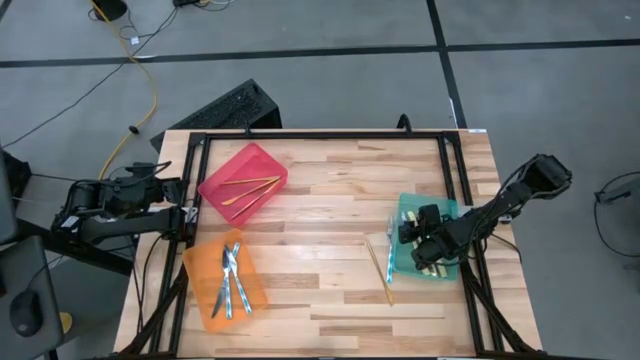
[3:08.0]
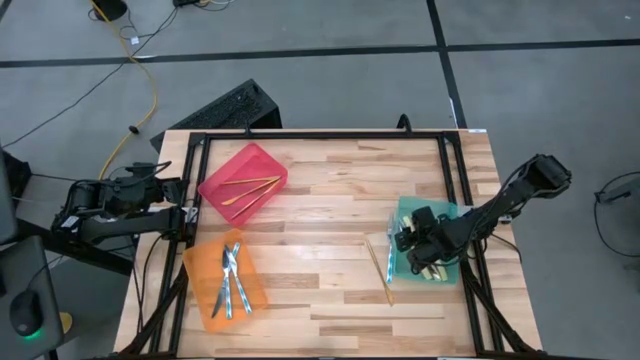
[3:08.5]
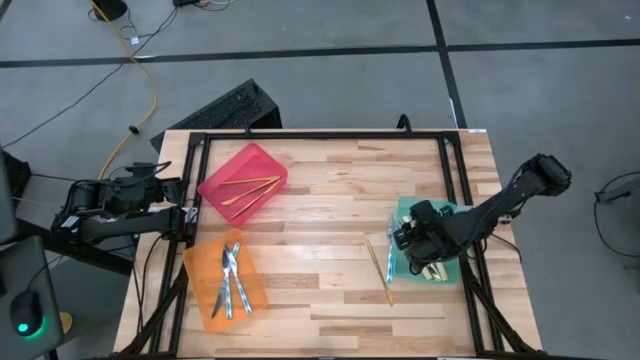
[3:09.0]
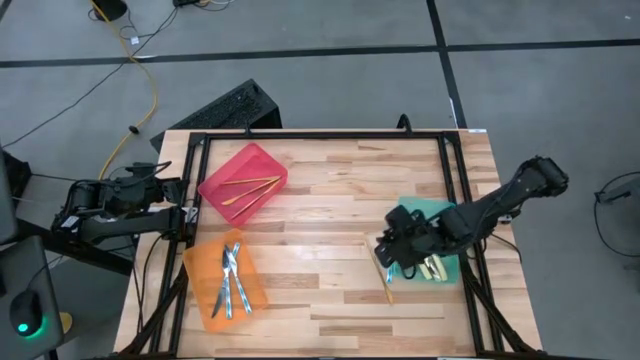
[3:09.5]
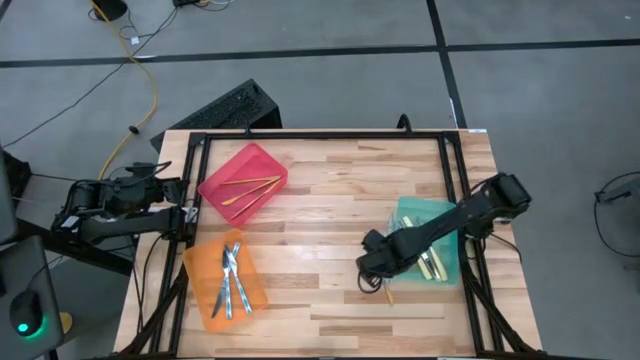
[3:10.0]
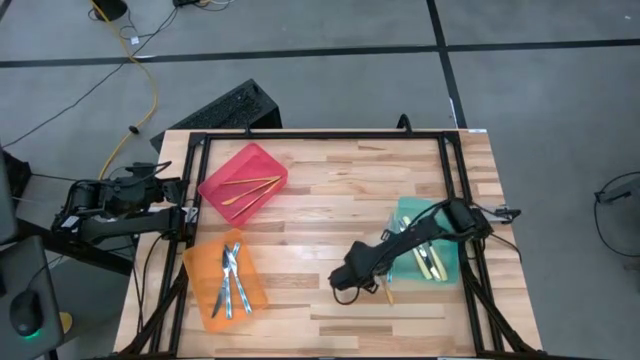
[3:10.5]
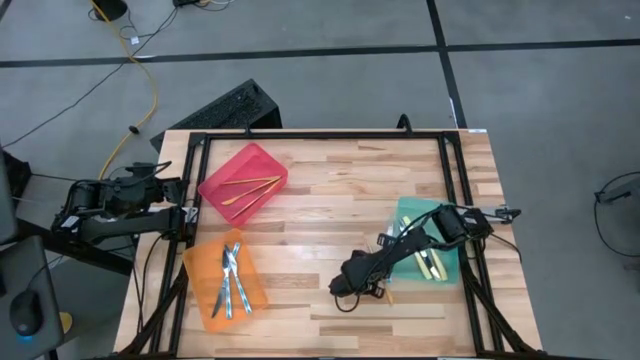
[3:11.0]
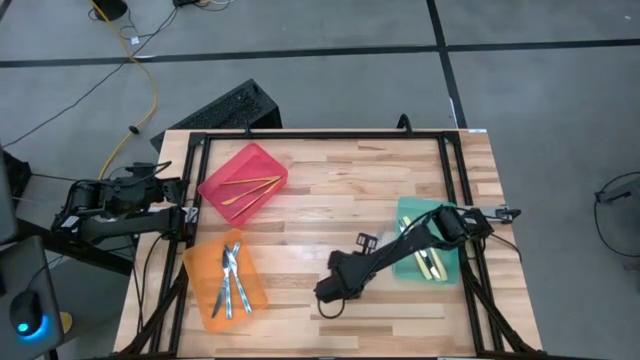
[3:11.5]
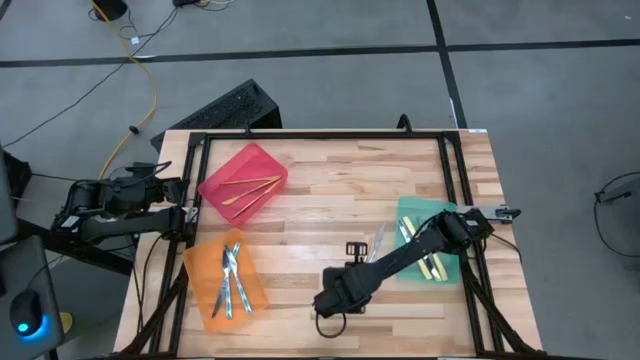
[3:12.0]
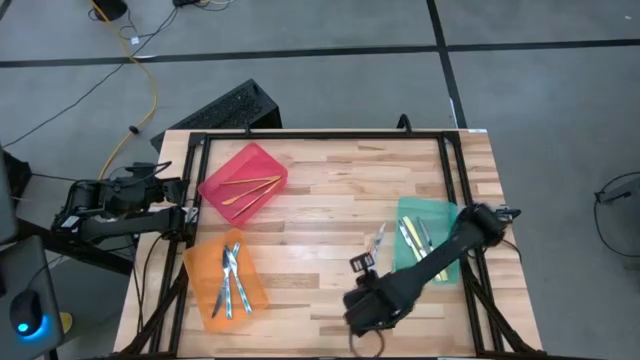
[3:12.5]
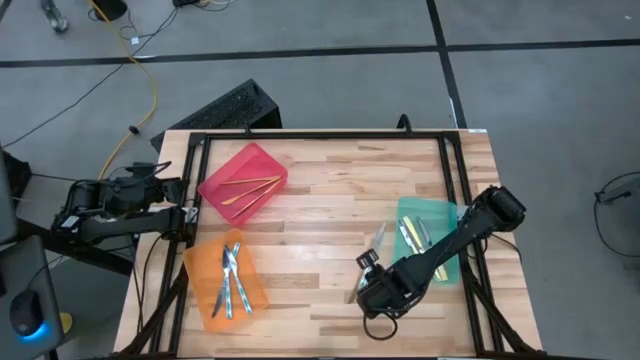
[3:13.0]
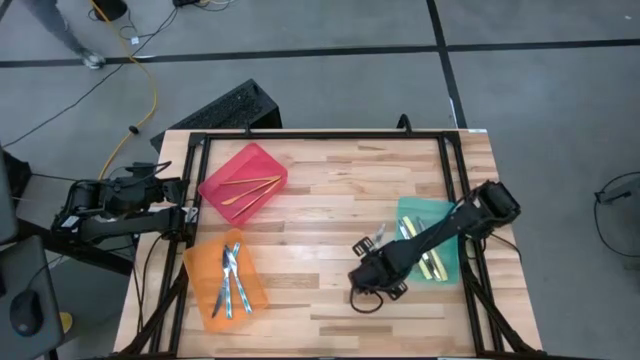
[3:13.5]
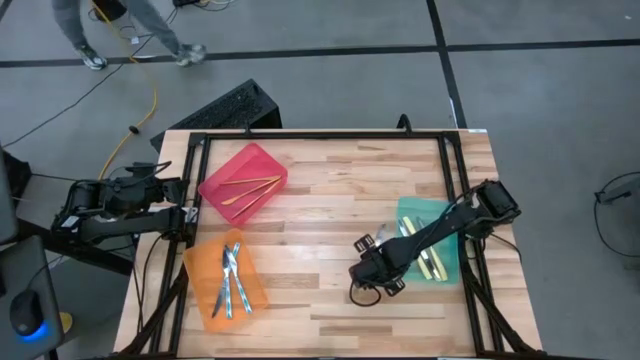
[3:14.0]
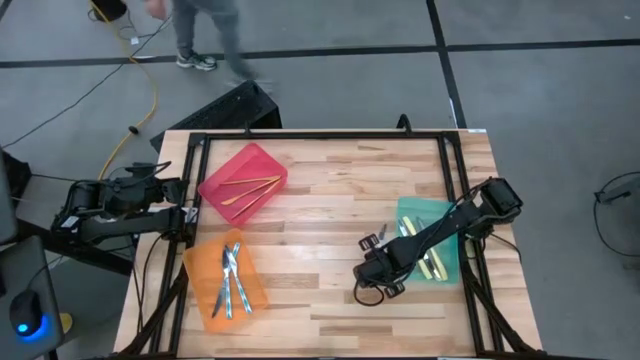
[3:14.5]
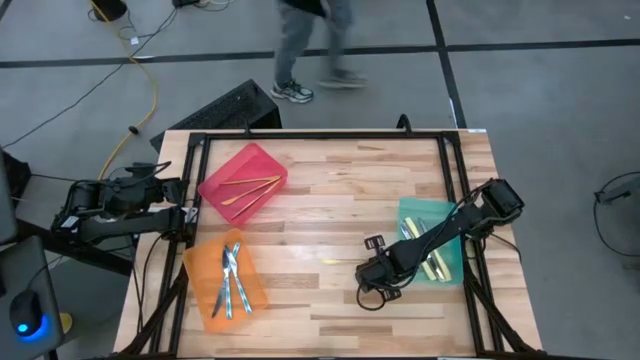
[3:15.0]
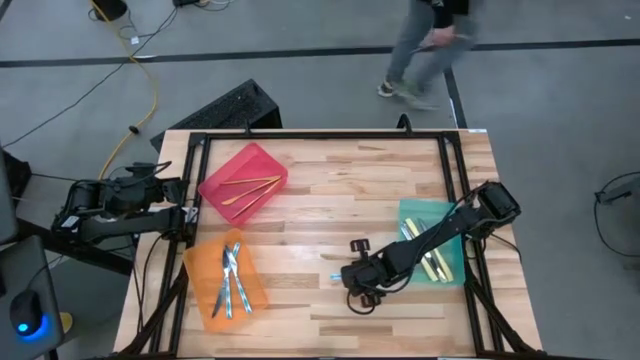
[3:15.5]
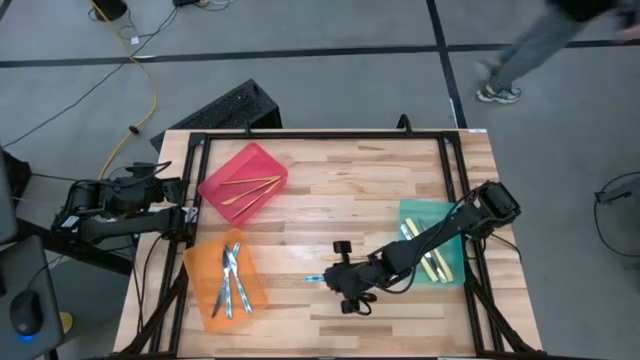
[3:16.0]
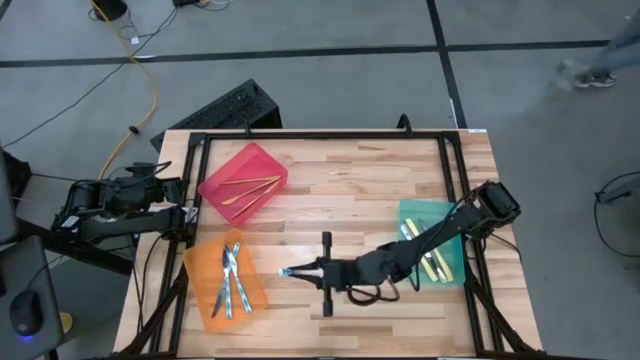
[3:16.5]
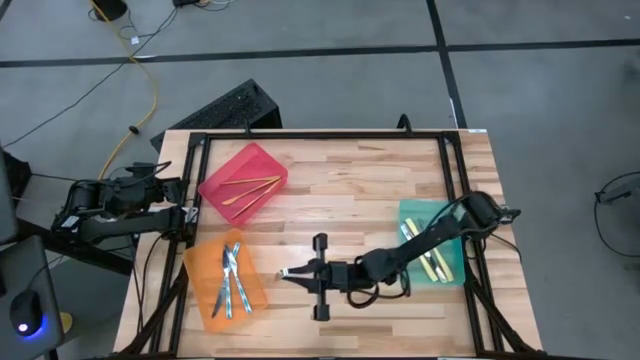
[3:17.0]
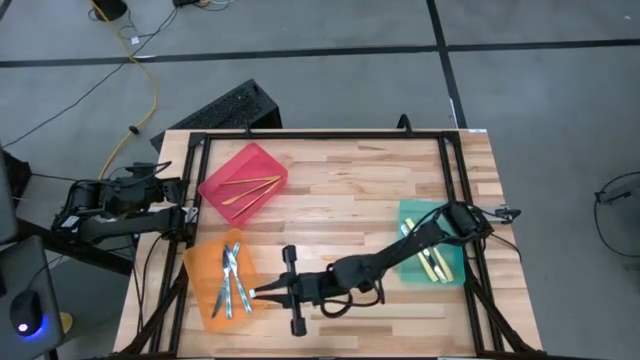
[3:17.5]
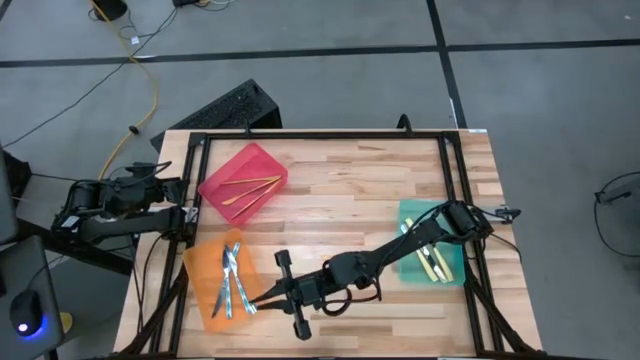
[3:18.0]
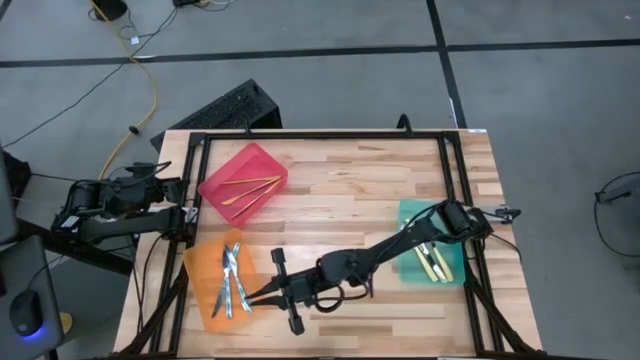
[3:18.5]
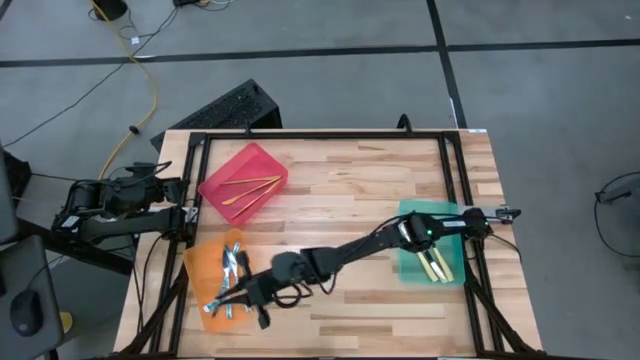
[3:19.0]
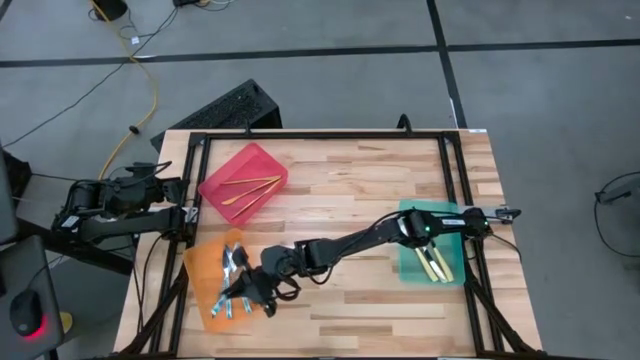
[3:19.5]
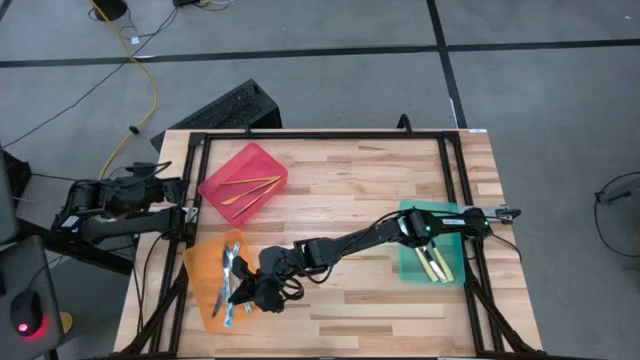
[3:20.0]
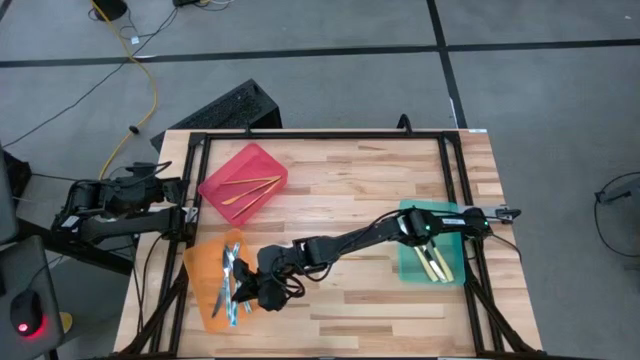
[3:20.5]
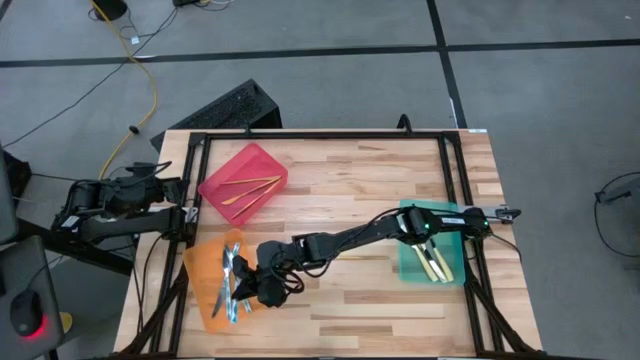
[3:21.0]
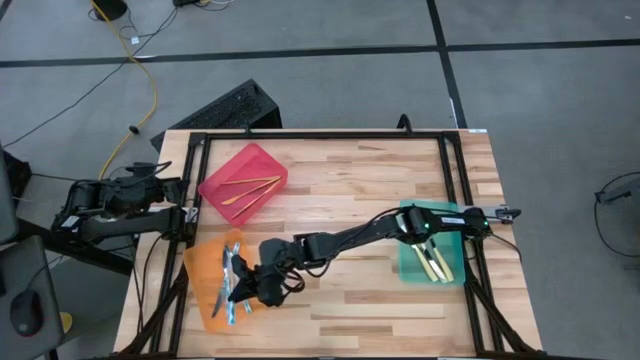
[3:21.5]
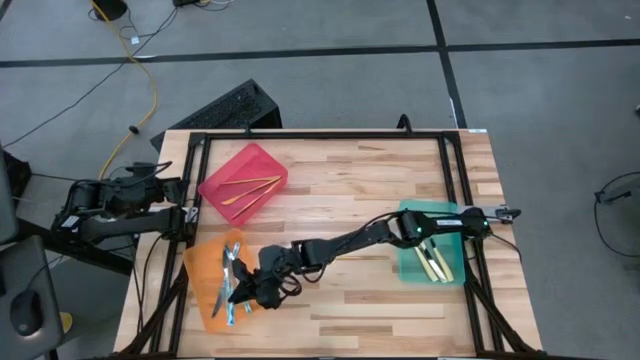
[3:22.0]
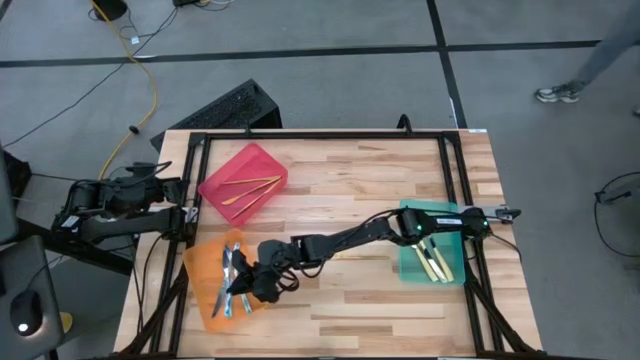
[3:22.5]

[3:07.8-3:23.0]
Task: Sort silverware by color (type)
Put the knife into the orange bin

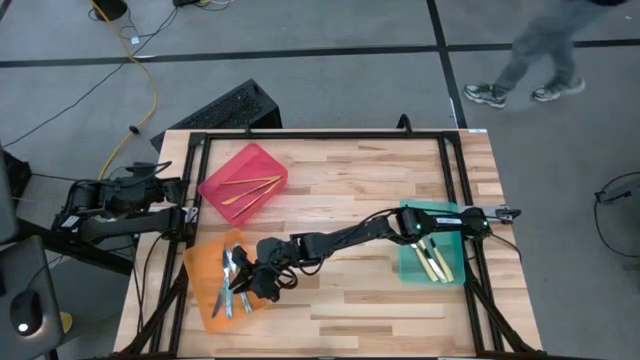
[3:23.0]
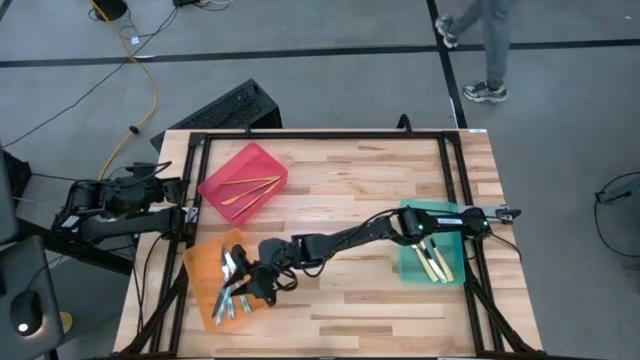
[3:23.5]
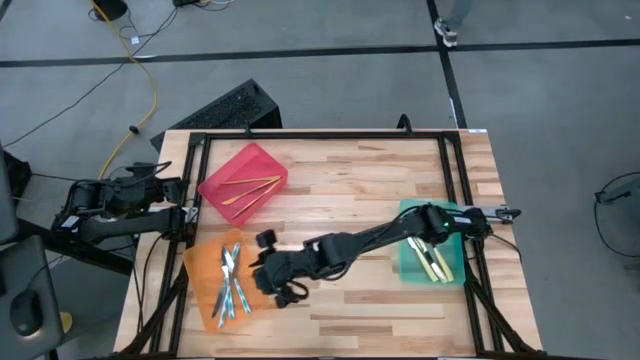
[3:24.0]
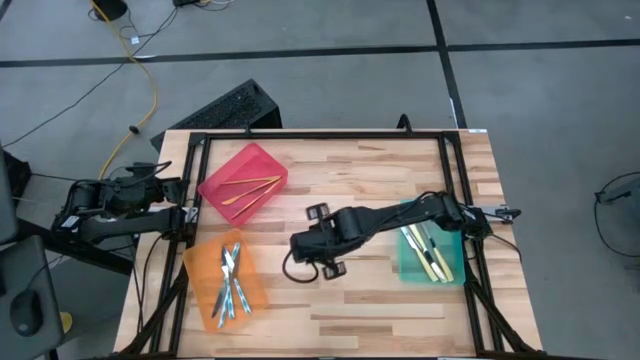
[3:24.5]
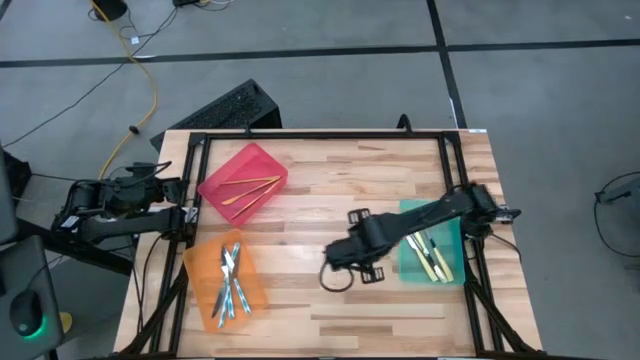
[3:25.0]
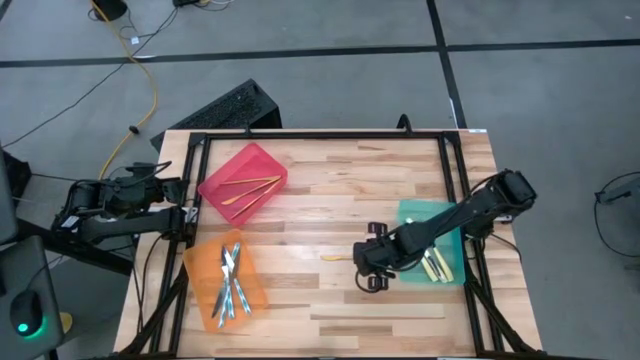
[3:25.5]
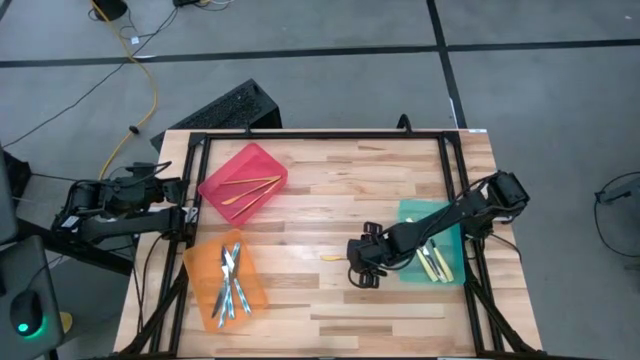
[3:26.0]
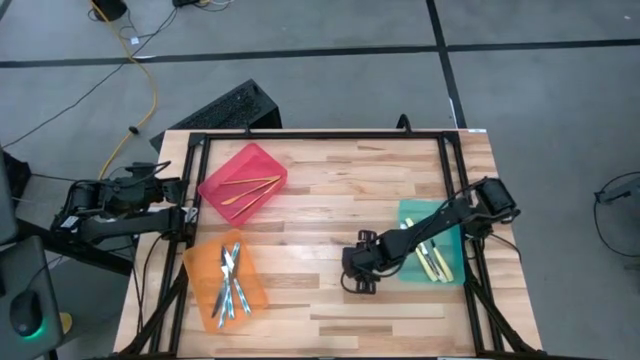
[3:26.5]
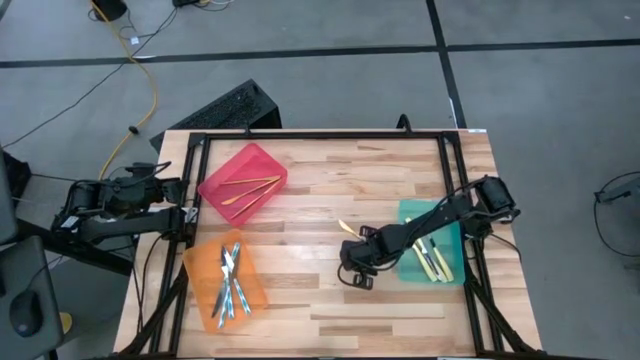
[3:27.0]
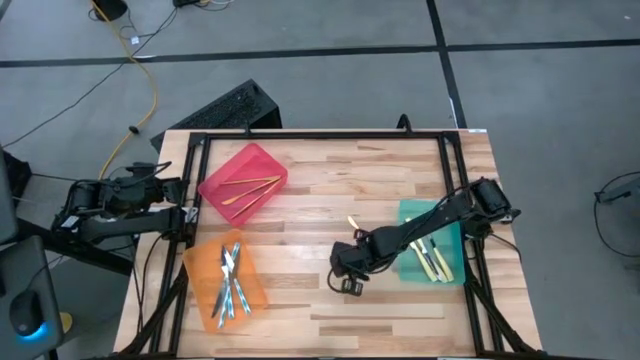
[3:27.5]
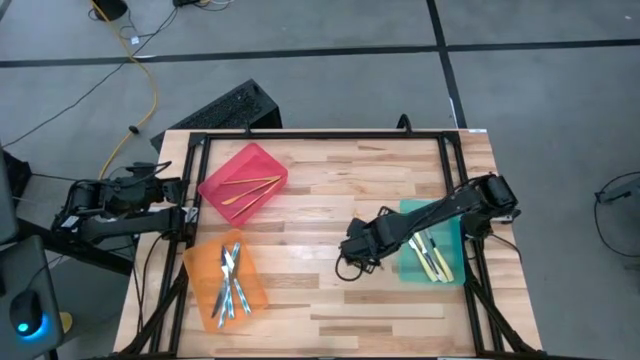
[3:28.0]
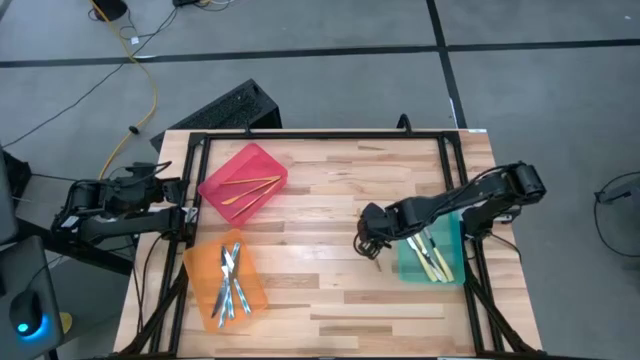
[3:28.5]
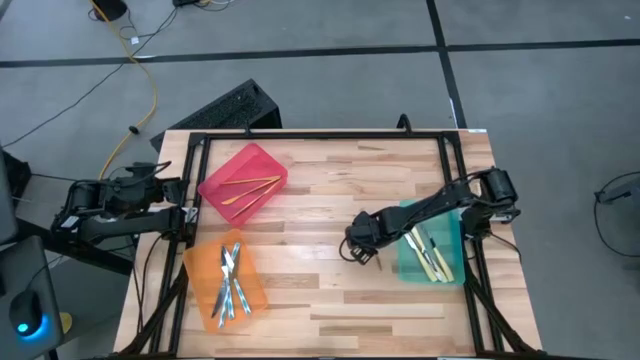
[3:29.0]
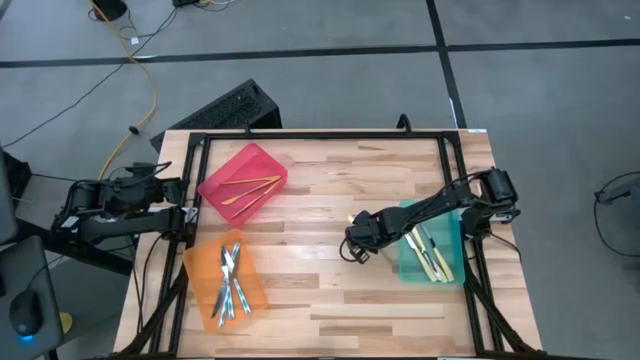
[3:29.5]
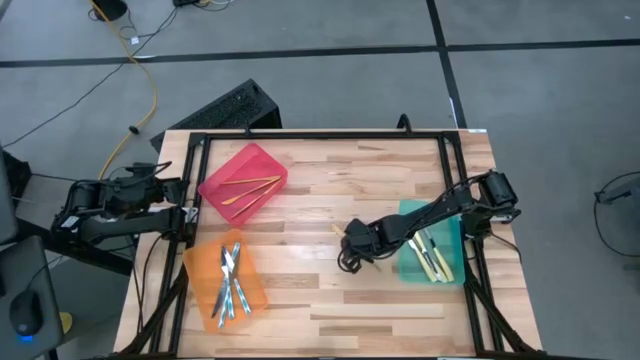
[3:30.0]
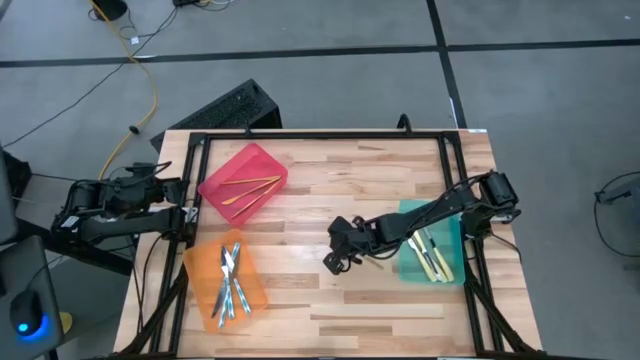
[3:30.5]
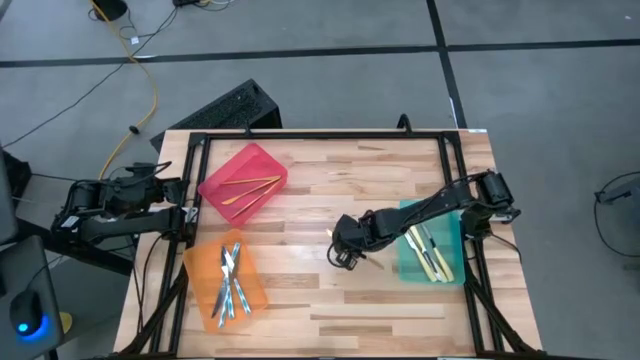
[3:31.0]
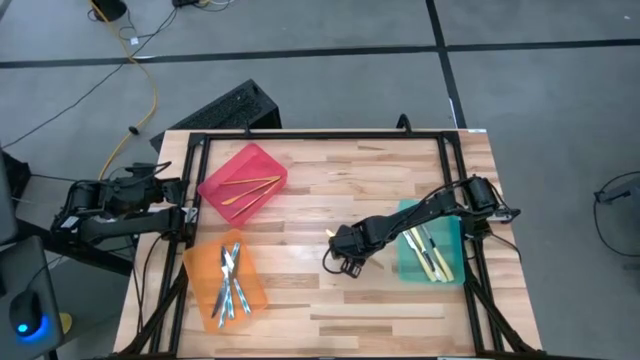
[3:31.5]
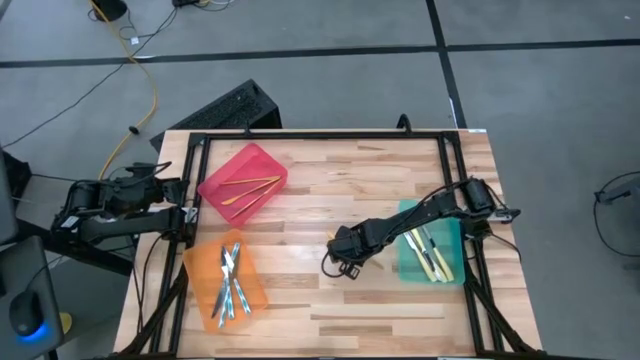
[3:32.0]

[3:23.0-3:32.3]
Put the gold knife into the red bin
